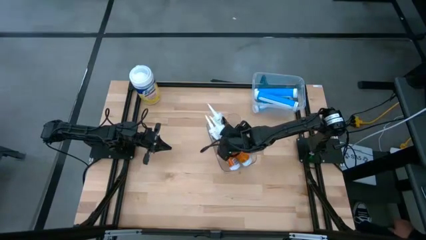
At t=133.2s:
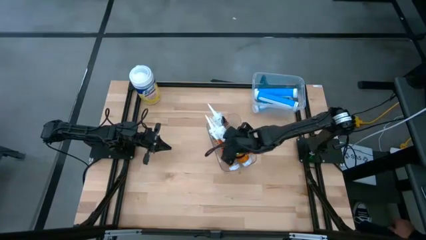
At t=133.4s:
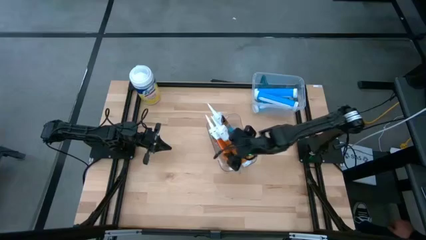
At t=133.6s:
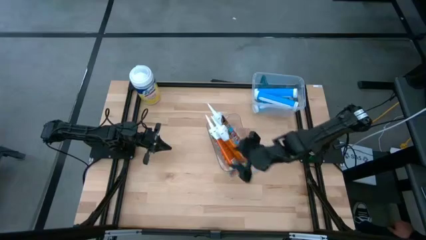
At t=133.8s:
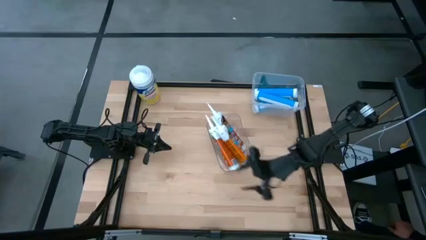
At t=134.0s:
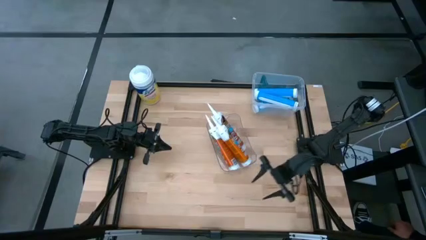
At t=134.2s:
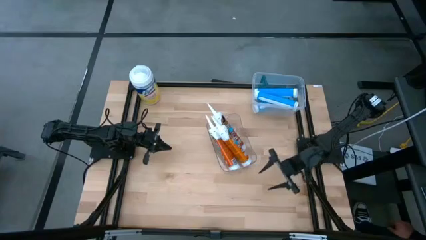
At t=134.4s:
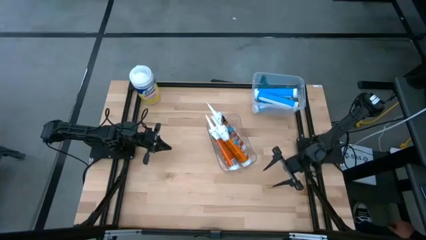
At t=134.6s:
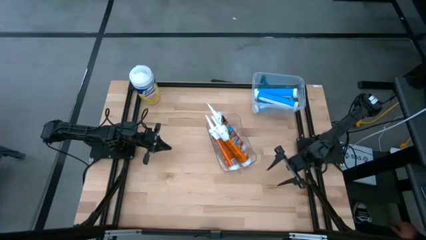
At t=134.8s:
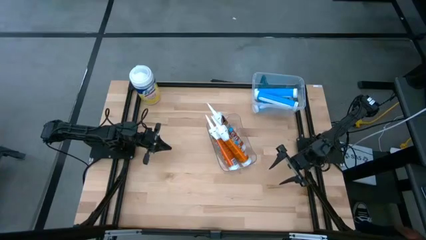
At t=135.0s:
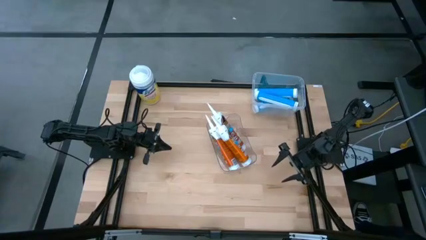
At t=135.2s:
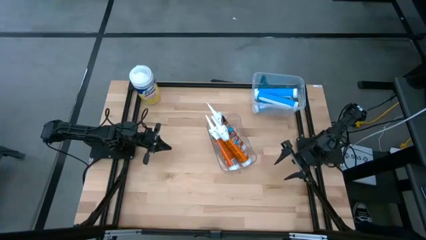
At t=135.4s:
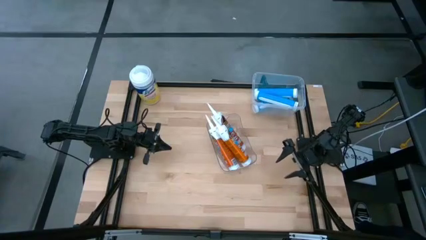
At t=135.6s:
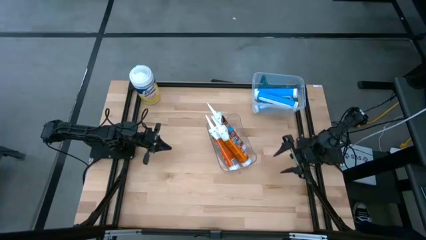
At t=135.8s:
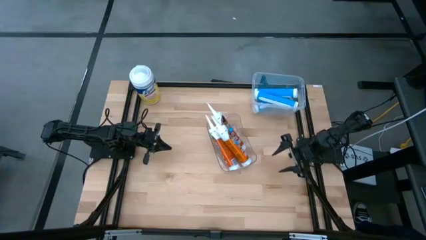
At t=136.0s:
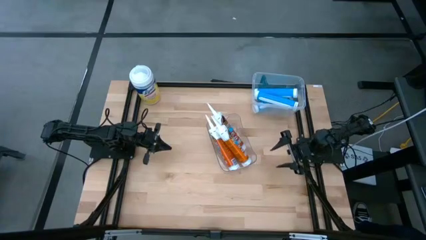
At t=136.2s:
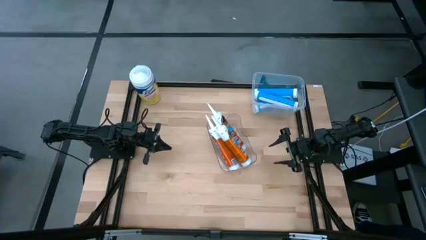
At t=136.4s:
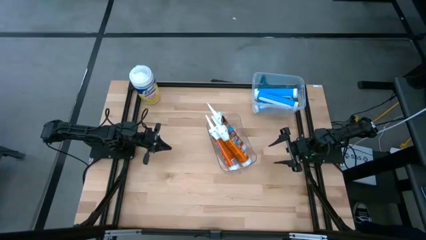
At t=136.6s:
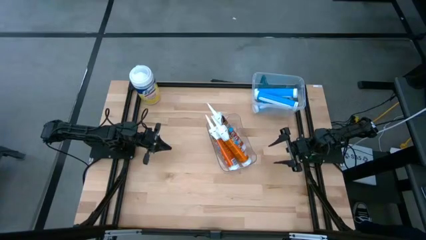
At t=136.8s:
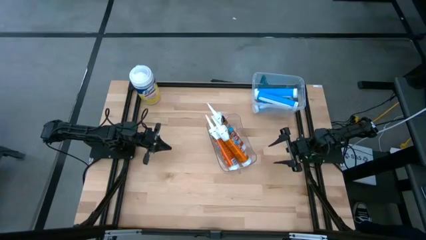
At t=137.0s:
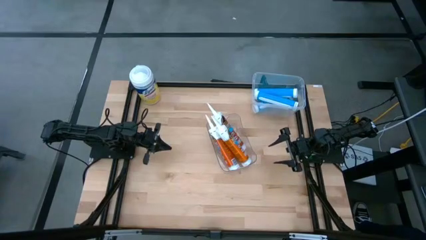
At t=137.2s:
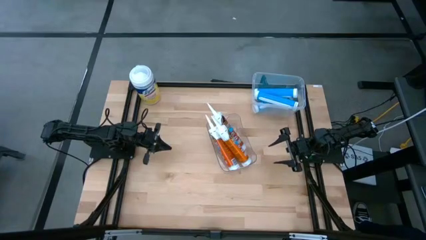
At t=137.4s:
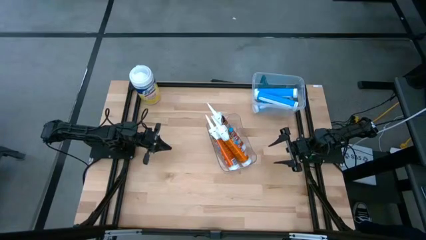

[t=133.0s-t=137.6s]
Task: Pick & place silicon tubes, Sealant and Lysol wipes
Return to Home Position
